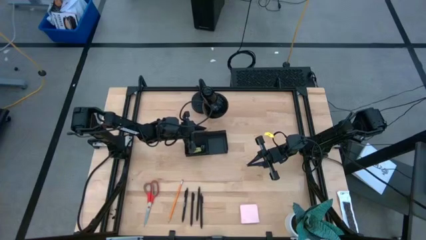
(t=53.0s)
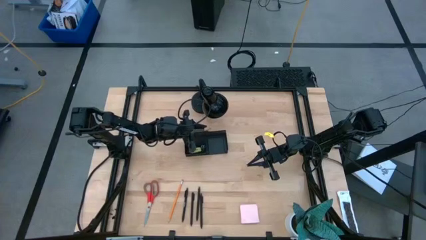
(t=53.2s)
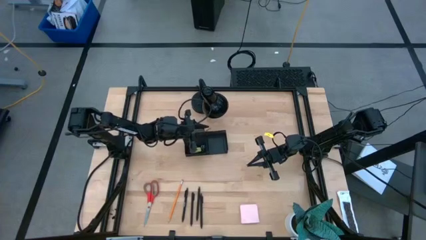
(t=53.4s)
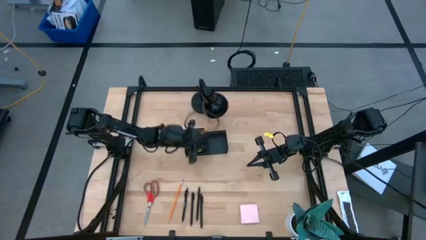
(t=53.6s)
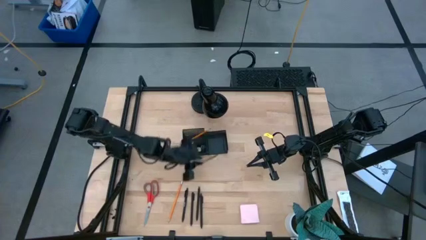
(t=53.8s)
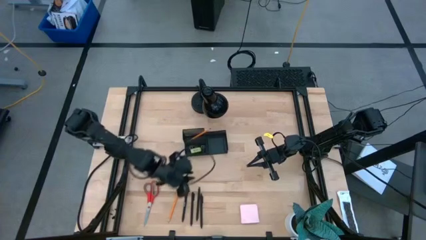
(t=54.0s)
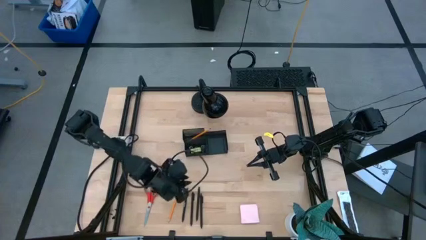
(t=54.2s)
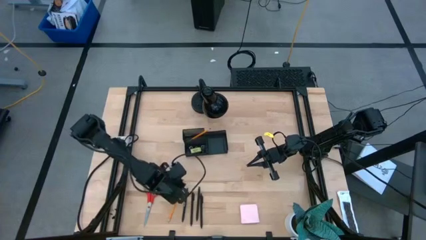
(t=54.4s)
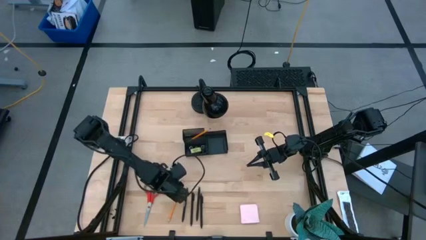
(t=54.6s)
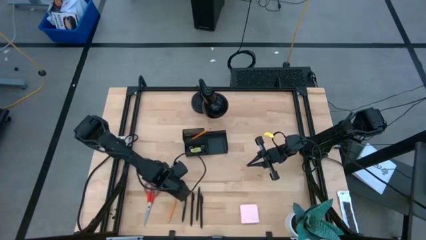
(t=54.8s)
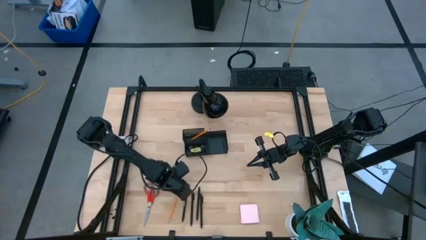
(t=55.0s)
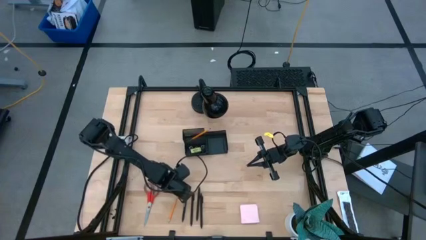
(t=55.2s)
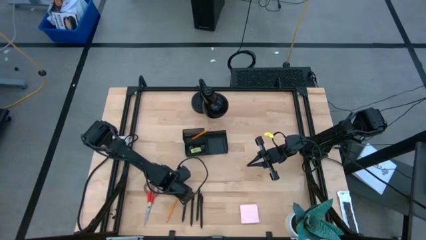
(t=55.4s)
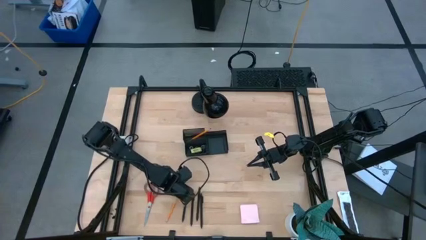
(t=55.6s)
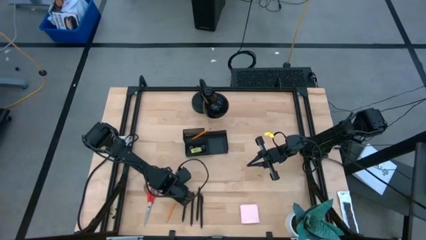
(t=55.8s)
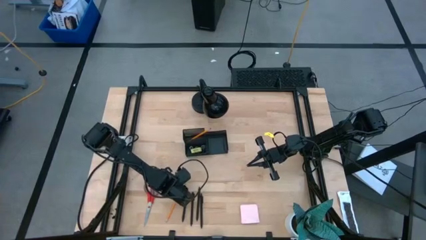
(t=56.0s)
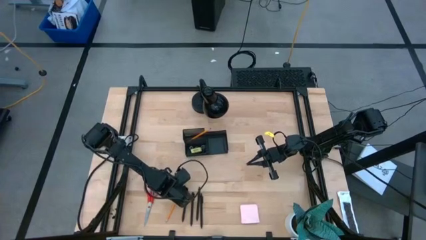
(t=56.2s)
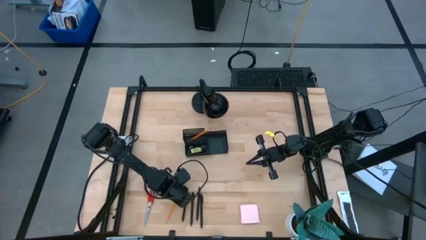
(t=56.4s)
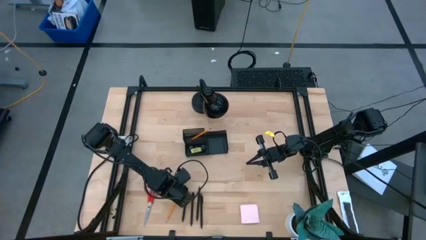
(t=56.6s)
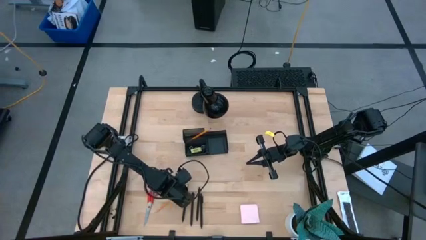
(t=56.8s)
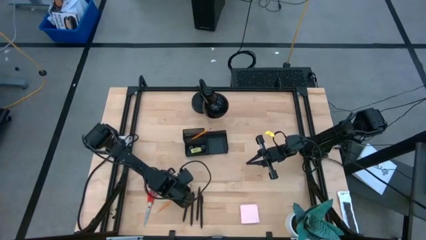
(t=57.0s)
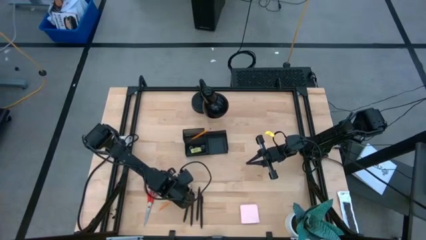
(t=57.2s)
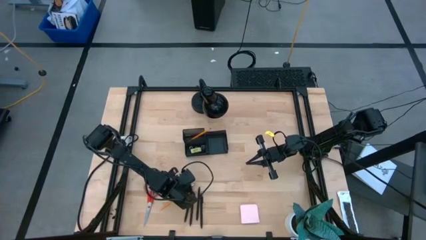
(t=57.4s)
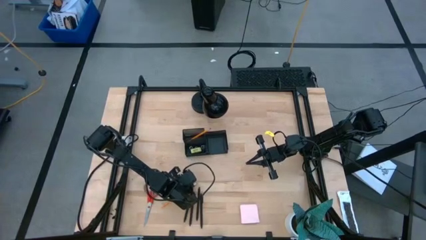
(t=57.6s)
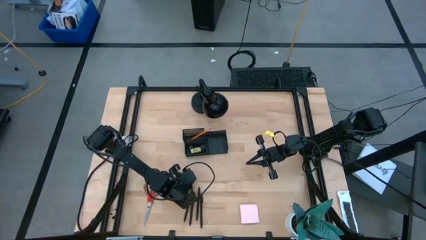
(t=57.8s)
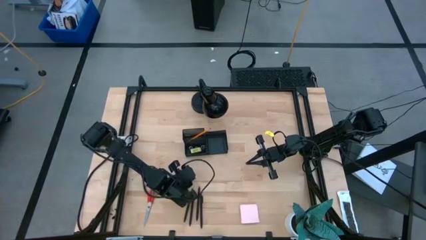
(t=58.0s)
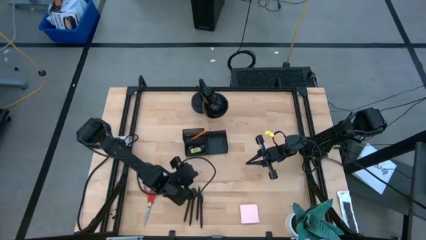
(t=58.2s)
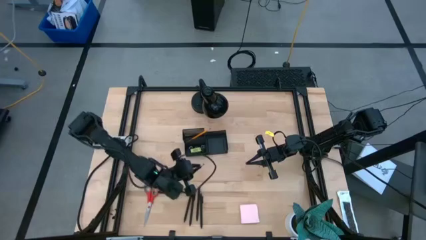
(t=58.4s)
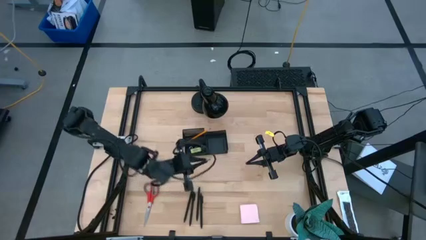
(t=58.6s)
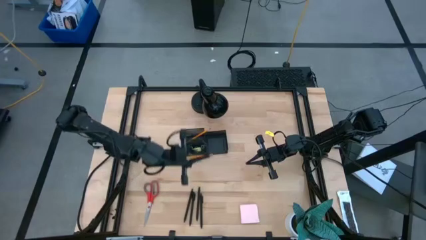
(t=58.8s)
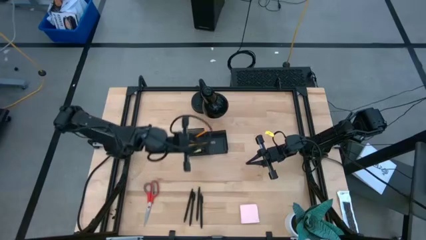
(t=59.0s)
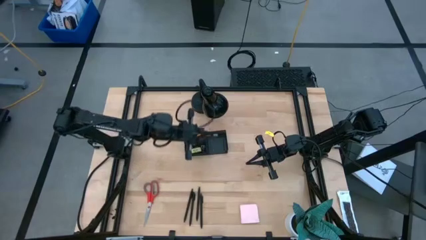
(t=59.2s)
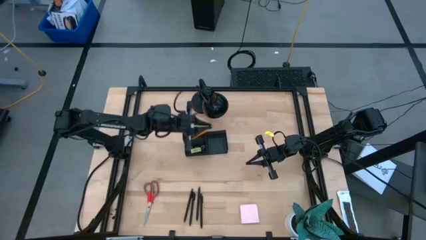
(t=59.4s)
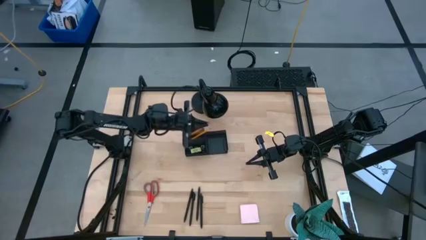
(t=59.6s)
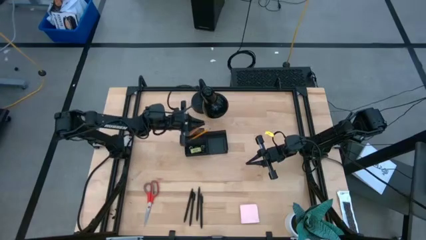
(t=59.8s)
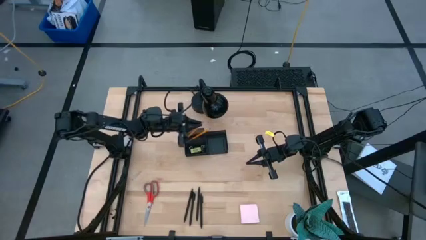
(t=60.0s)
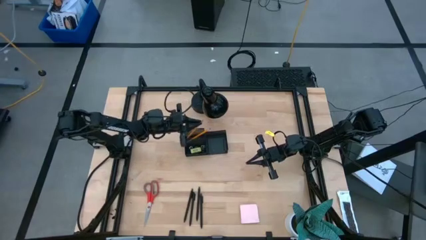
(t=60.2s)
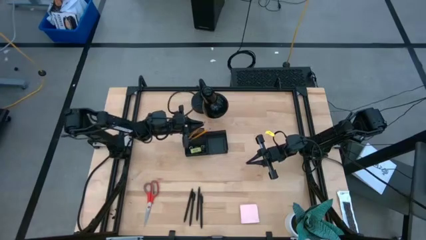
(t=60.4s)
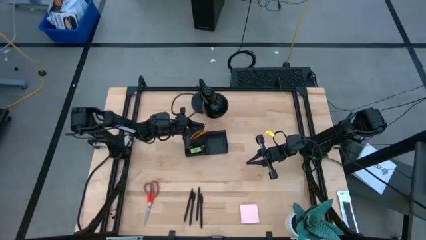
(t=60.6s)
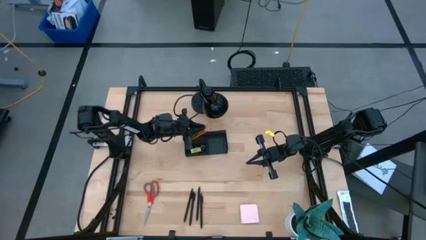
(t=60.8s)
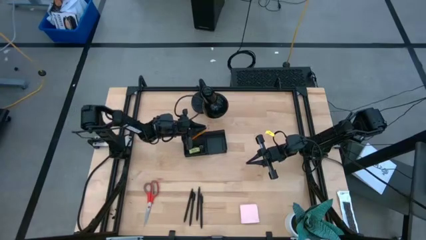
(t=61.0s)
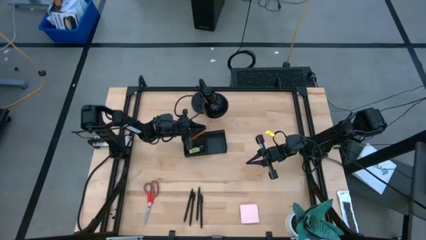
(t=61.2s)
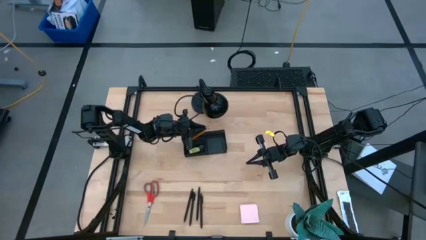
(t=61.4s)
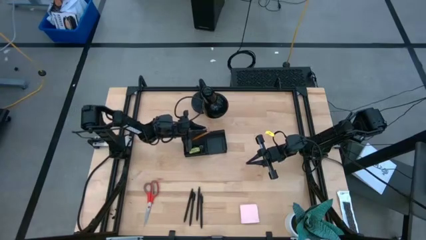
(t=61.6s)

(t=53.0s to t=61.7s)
Task: Pick and place office supplies into organizer
Put the orange pencil into the black desk organizer

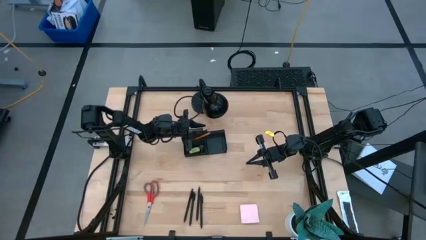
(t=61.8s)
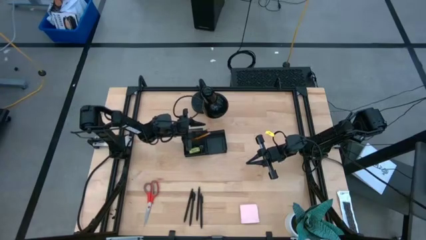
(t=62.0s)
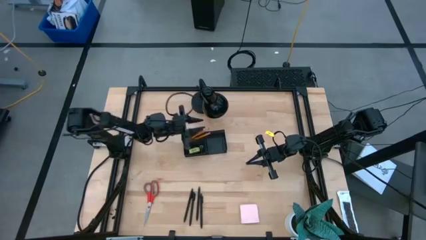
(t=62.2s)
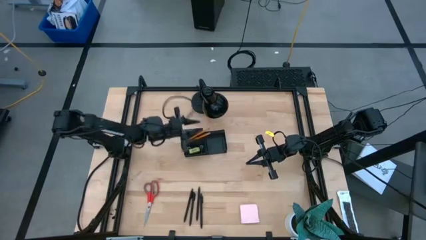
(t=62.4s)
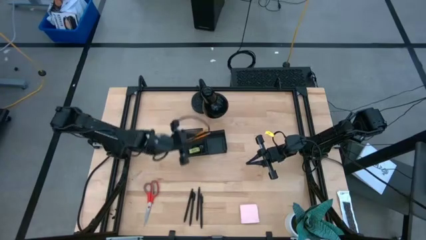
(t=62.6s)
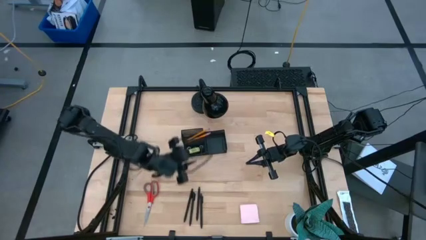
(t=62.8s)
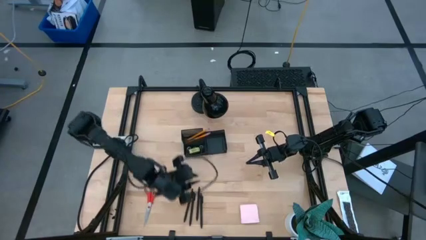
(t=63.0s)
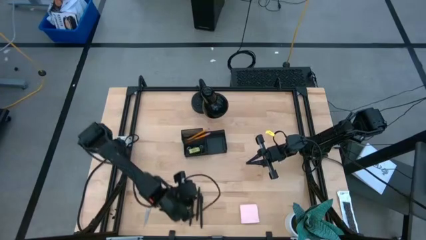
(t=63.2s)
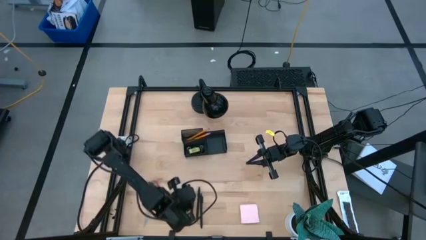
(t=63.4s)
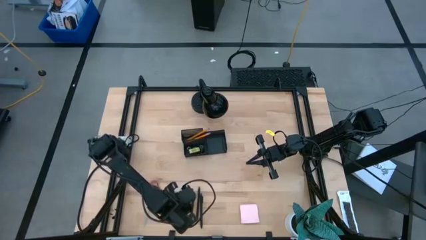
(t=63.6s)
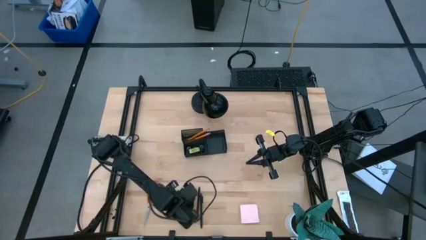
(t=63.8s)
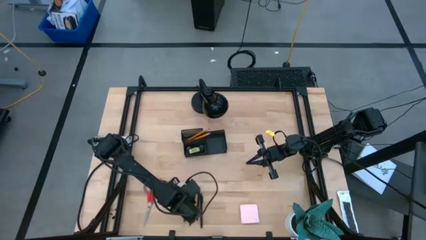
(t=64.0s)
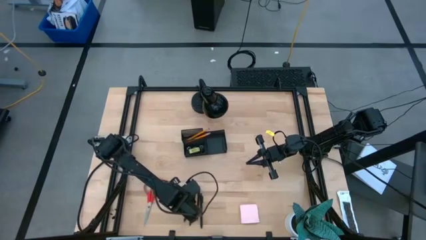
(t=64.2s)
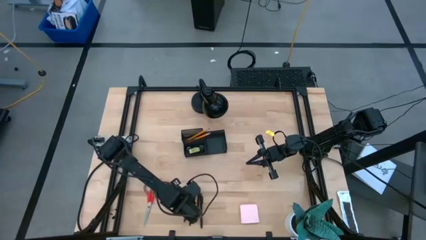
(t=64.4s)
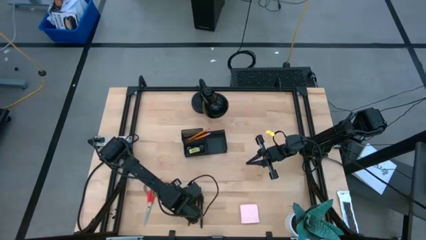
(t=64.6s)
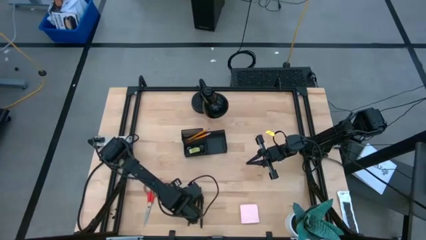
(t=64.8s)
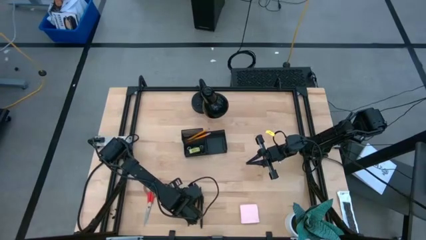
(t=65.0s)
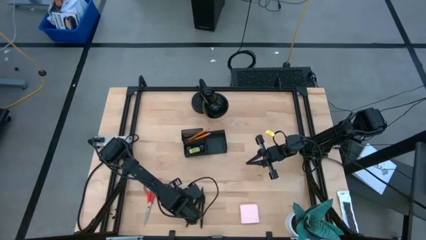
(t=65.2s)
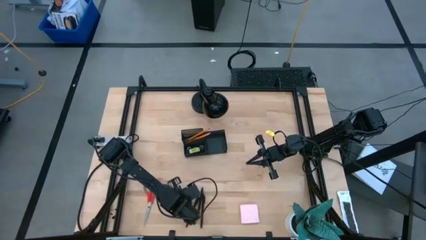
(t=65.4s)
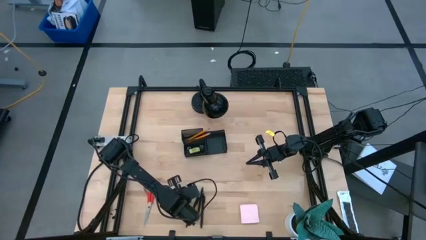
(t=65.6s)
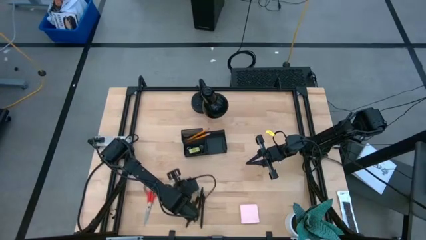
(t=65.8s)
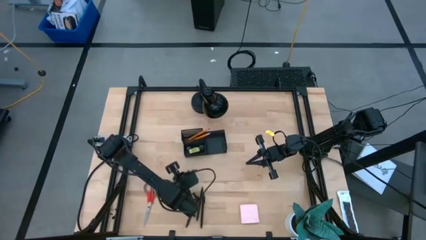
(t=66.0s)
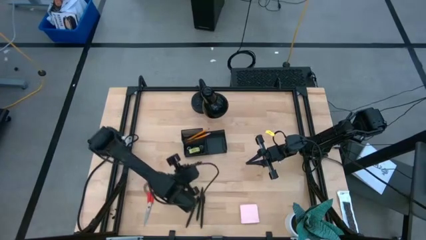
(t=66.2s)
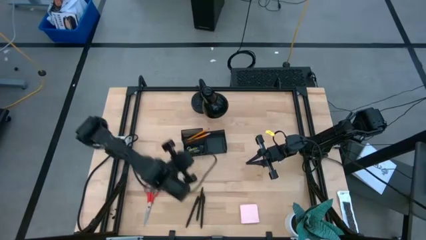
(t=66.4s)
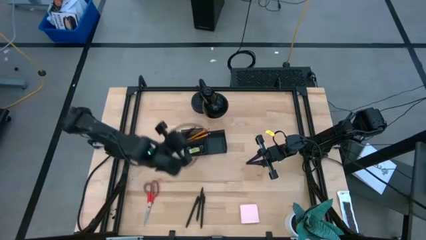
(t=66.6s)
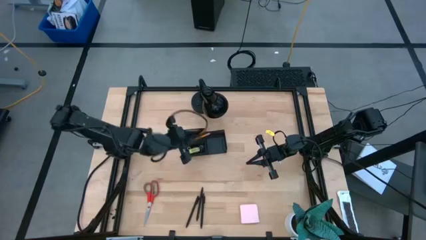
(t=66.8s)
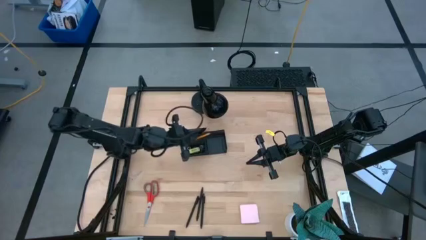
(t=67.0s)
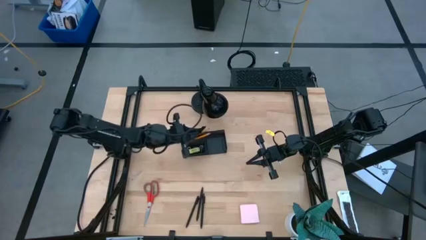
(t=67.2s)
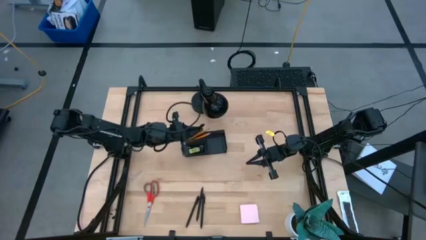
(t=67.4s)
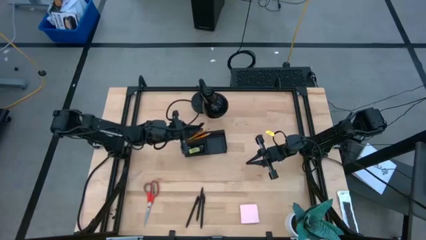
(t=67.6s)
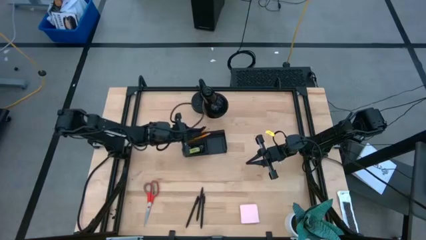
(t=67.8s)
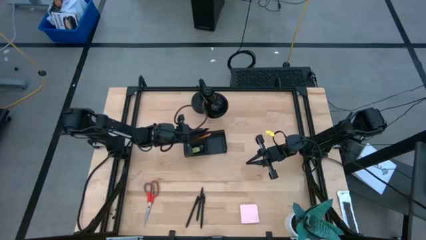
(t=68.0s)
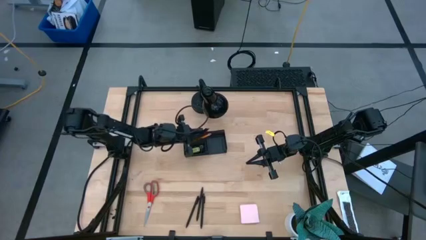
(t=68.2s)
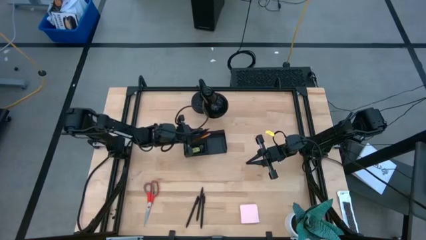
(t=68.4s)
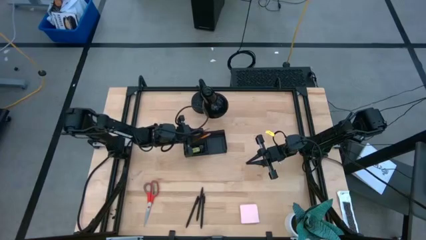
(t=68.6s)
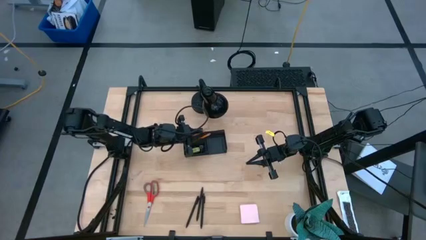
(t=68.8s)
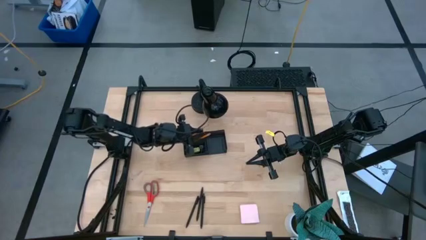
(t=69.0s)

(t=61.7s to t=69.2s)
Put the black pen into the black desk organizer

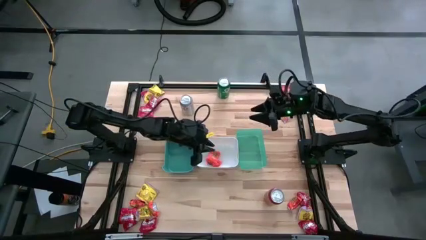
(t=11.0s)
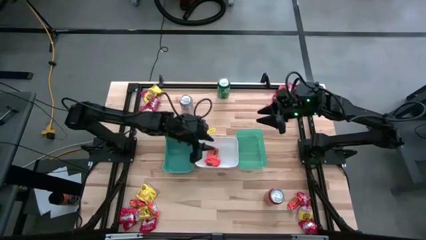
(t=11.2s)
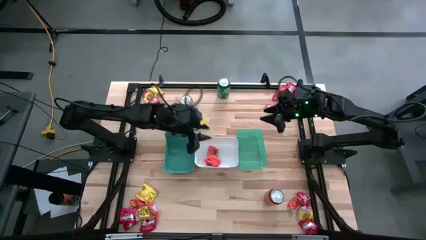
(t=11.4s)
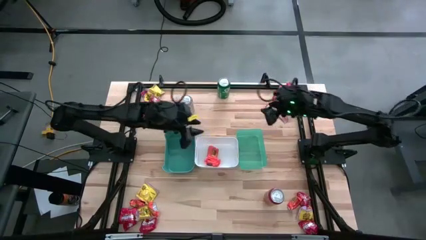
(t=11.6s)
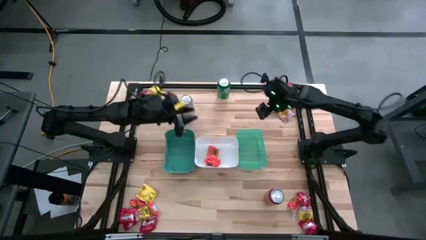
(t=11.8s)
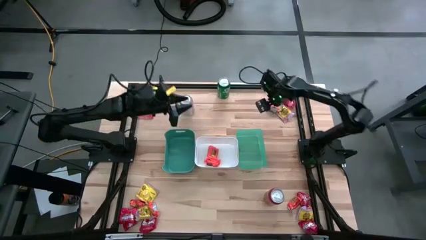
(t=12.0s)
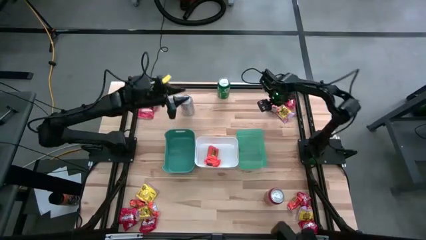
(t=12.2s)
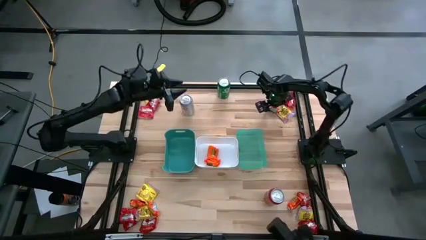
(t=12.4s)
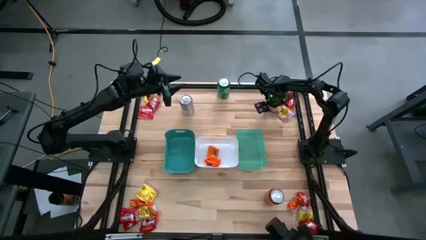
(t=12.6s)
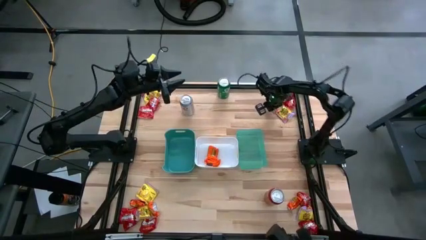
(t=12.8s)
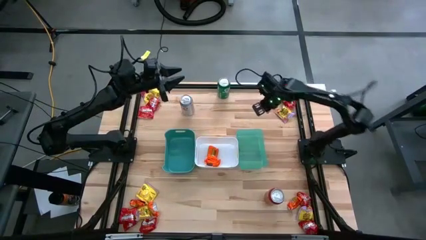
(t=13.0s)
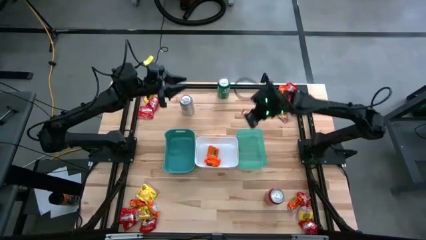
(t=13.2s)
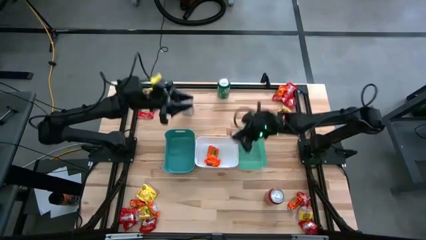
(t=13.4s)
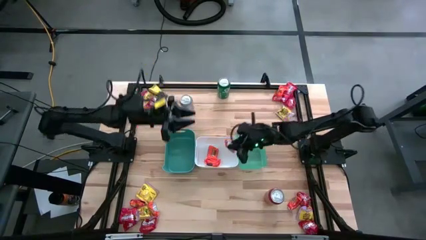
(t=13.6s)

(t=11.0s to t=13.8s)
Task: Sort candy
Put the orange chocolate into the white bin
